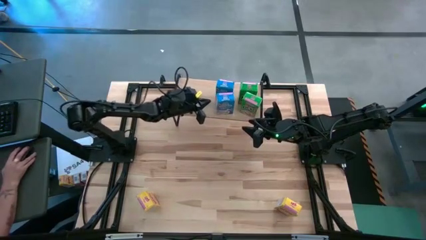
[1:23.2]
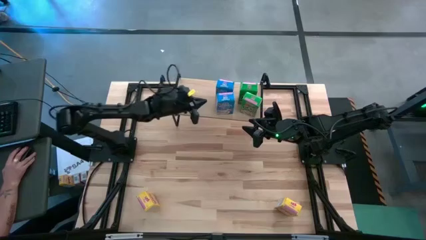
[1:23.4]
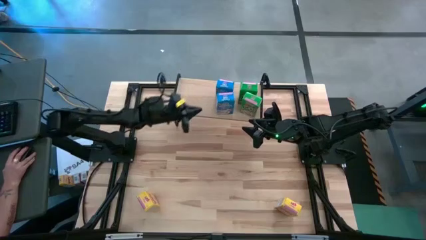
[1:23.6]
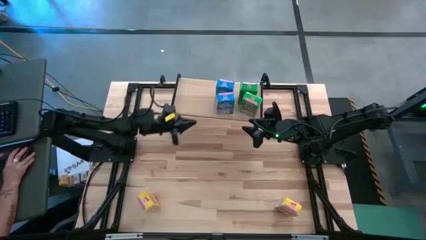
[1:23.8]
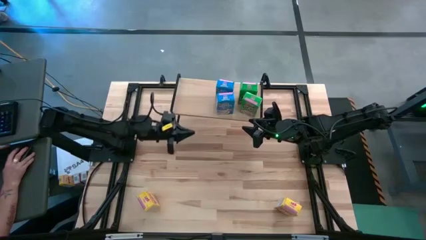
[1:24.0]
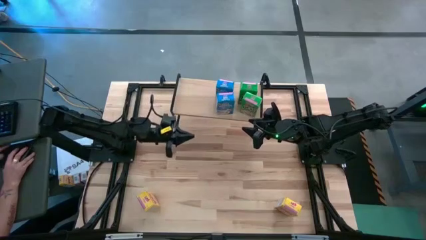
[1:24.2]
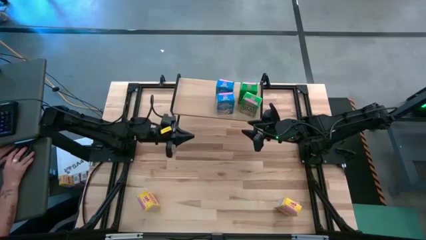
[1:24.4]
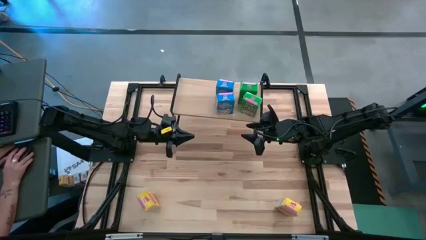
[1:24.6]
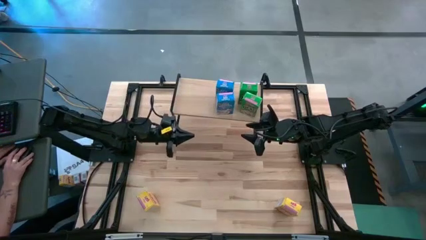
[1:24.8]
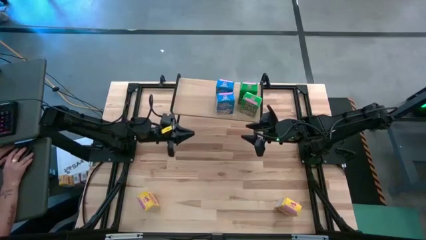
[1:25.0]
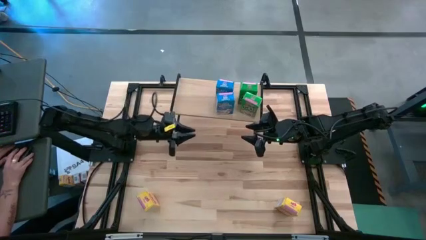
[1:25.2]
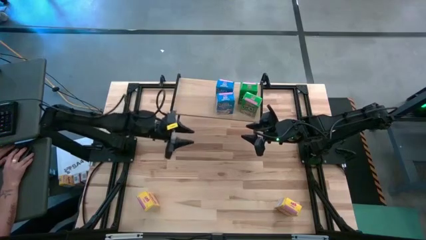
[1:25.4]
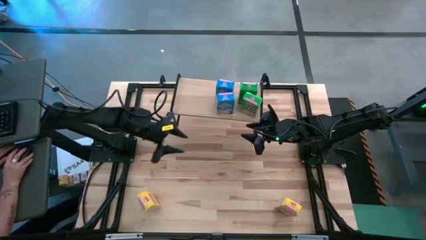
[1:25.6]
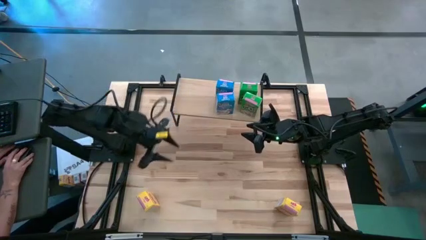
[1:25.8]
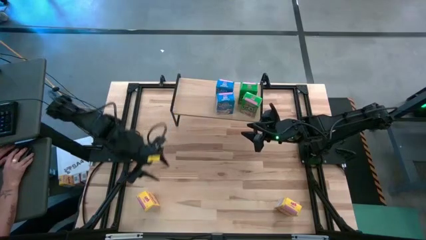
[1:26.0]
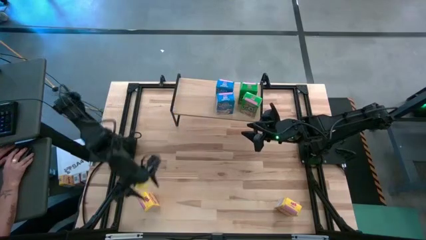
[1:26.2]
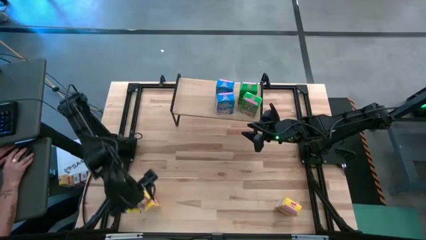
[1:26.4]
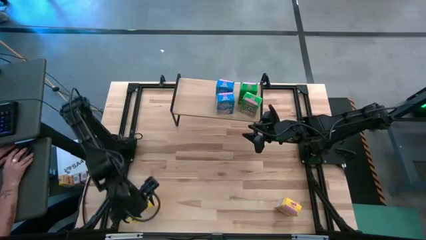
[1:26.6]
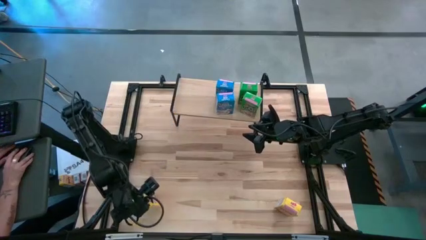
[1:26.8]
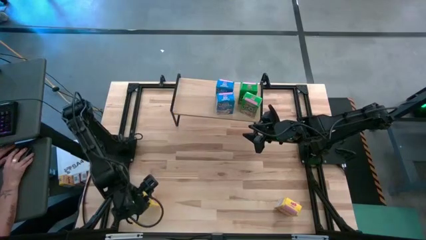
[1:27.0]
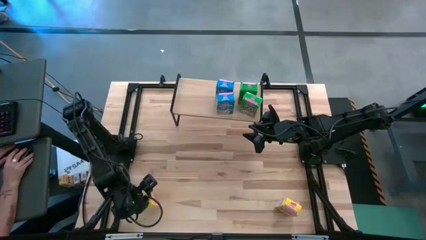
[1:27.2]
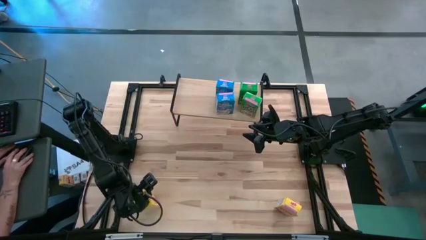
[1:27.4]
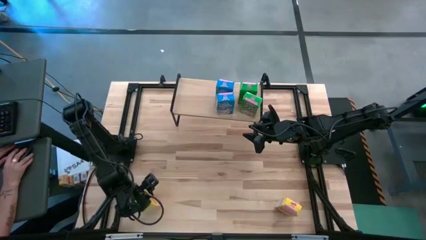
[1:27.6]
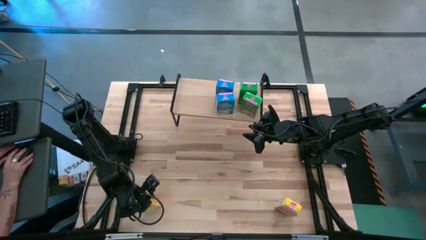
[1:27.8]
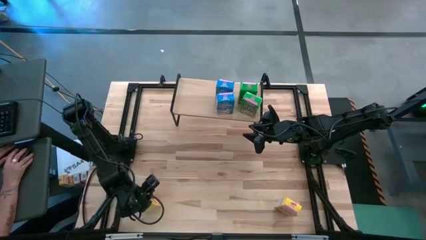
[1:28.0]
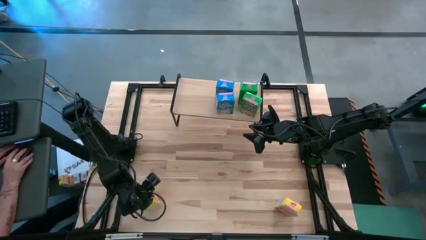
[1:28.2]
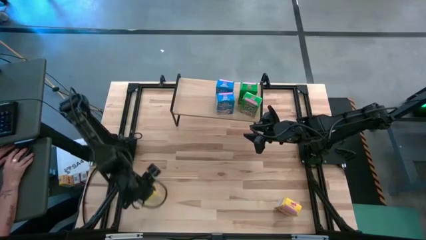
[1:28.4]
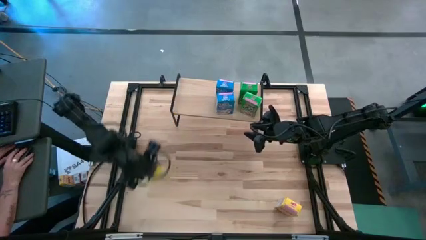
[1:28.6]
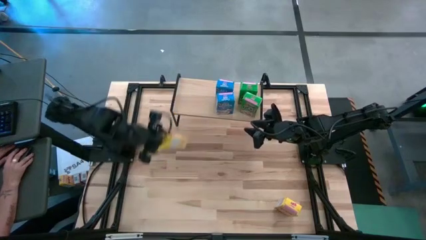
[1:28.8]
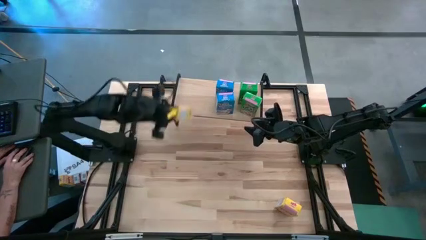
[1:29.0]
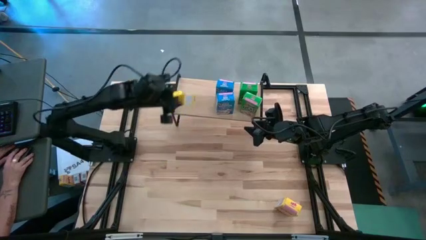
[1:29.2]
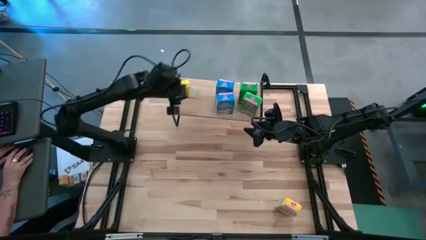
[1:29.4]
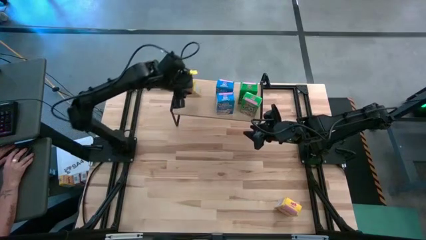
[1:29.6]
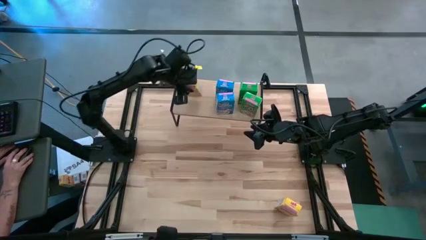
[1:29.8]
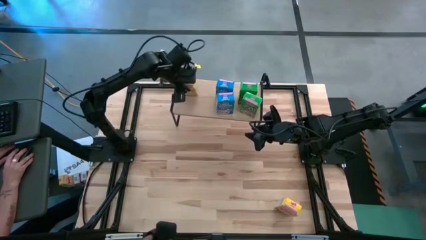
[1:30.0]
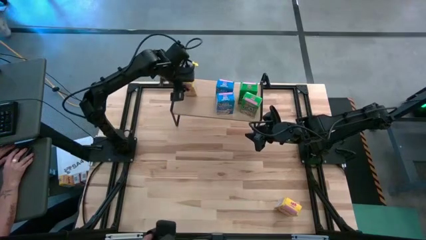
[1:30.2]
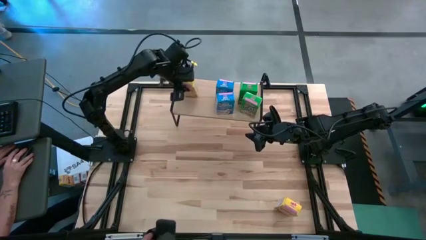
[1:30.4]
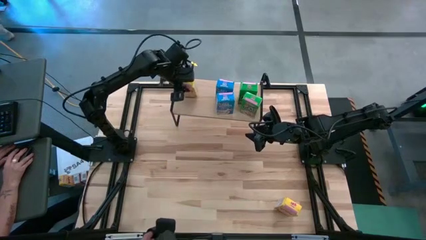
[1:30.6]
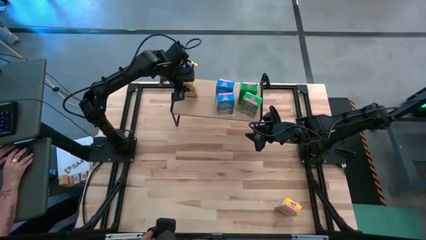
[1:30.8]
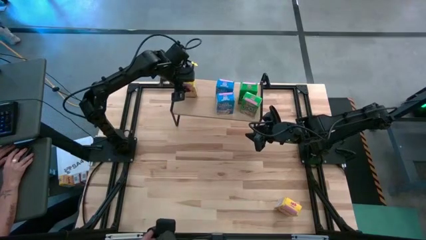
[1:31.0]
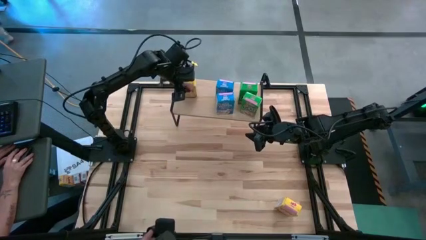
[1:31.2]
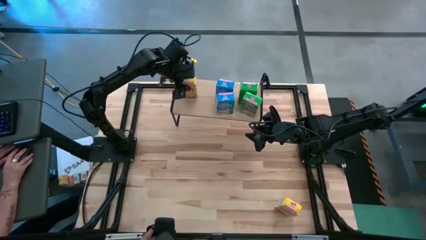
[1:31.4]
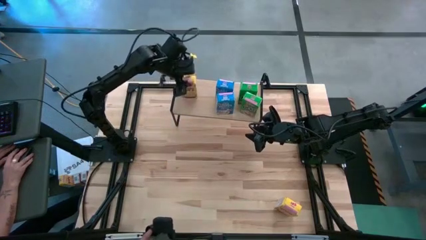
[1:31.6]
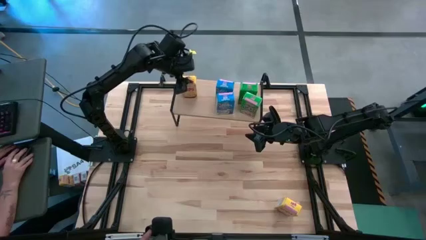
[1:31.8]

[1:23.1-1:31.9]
Task: Stack cereal on shelf
Put the left yellow cereal box on the shelf

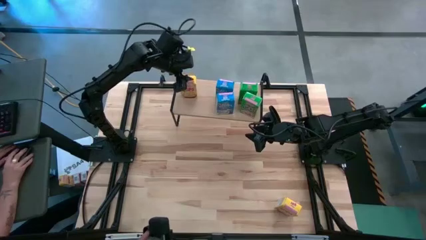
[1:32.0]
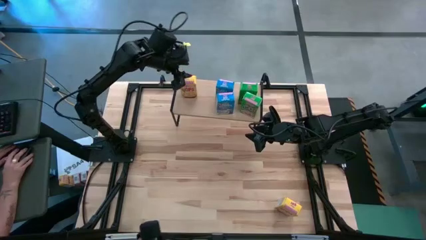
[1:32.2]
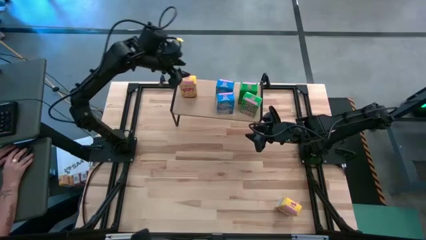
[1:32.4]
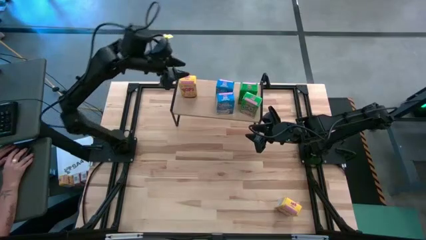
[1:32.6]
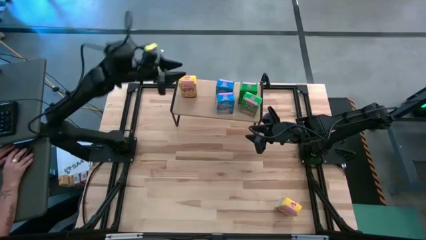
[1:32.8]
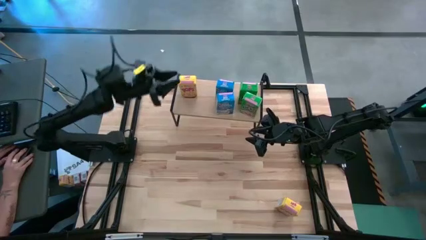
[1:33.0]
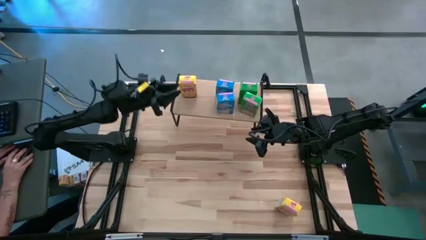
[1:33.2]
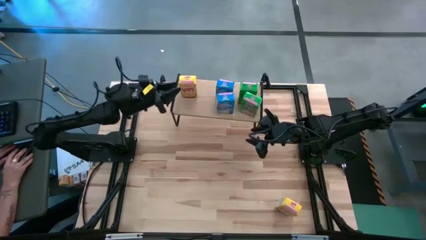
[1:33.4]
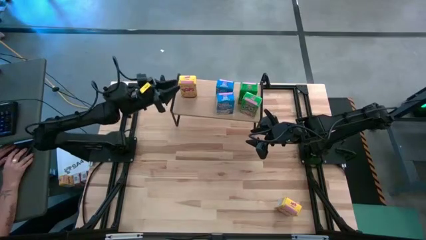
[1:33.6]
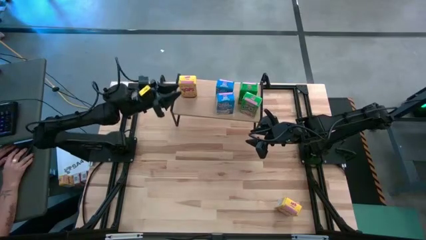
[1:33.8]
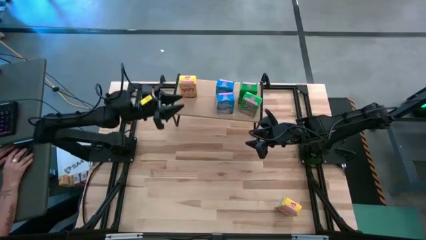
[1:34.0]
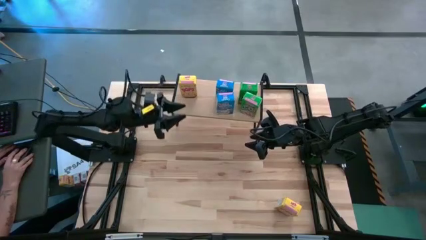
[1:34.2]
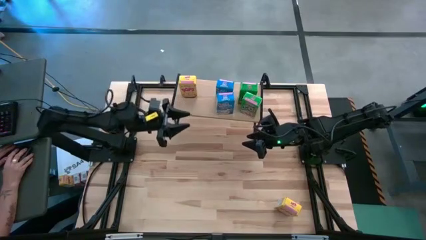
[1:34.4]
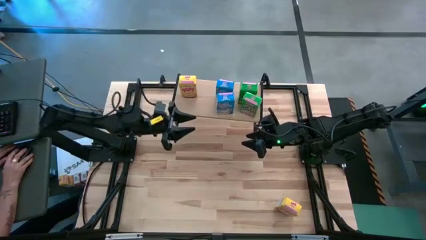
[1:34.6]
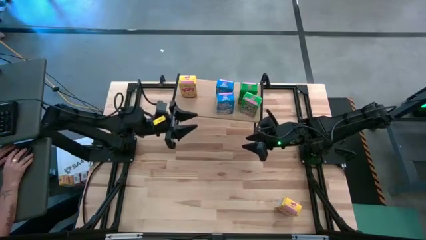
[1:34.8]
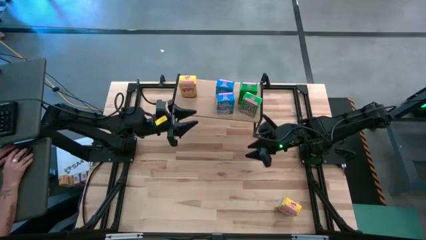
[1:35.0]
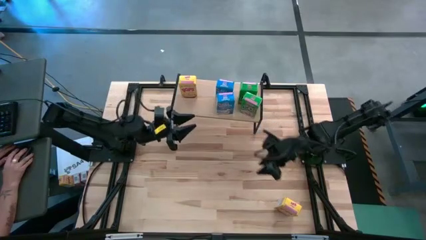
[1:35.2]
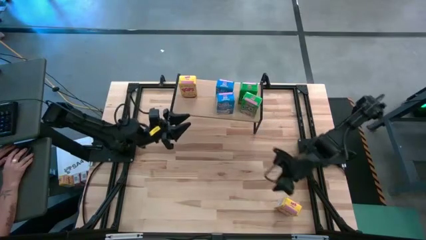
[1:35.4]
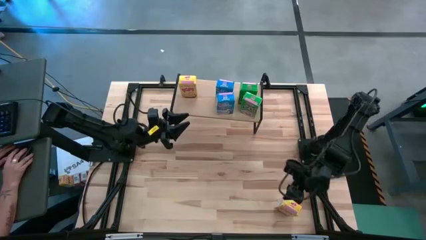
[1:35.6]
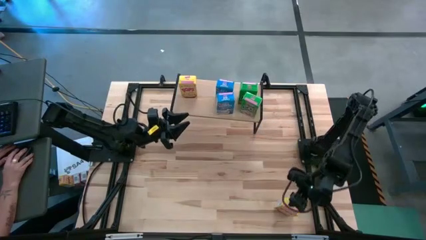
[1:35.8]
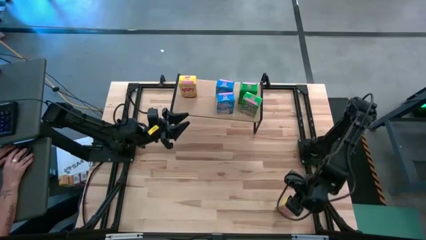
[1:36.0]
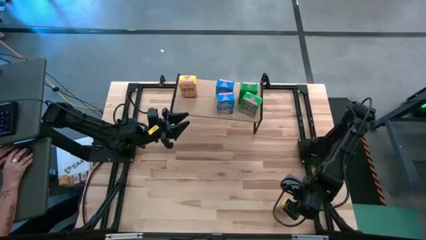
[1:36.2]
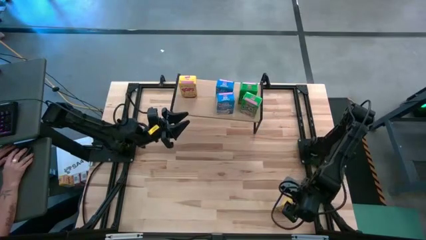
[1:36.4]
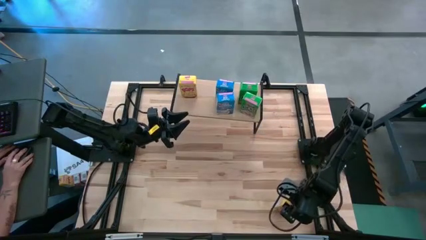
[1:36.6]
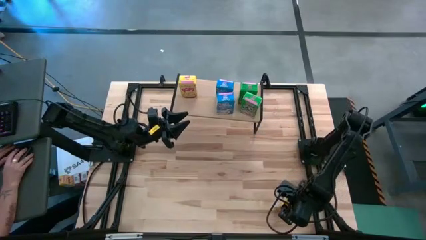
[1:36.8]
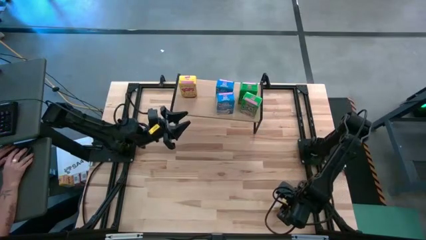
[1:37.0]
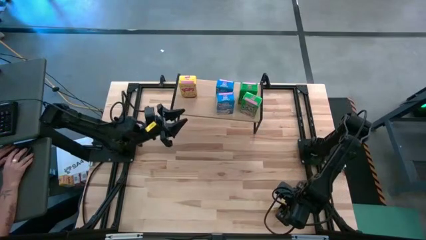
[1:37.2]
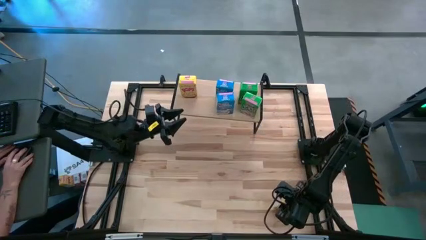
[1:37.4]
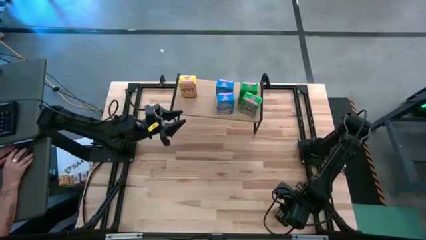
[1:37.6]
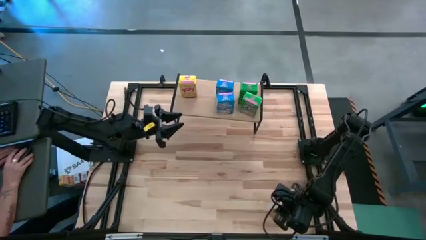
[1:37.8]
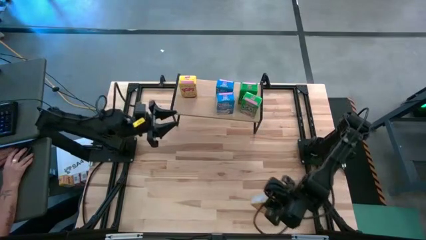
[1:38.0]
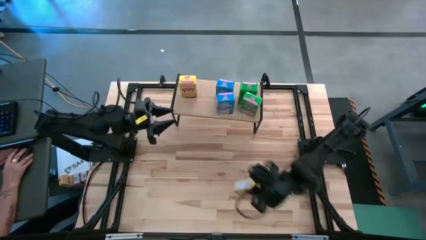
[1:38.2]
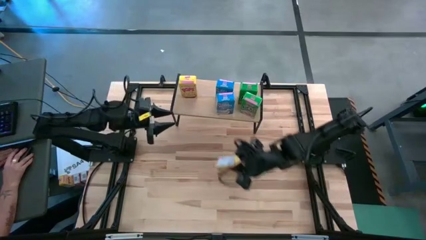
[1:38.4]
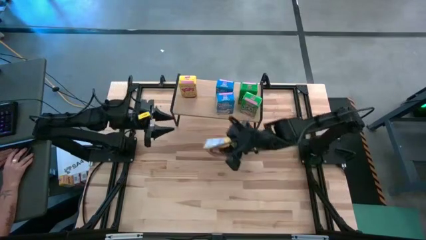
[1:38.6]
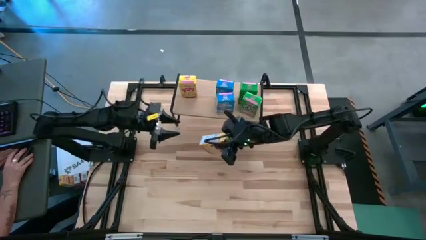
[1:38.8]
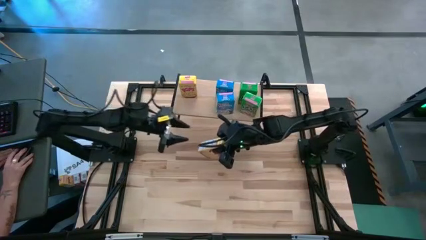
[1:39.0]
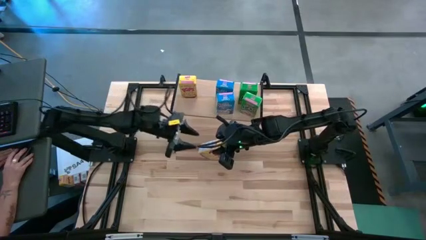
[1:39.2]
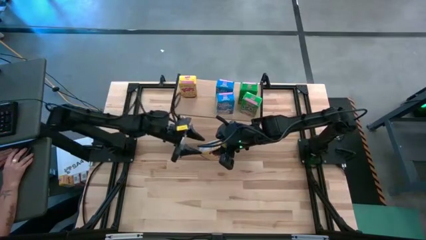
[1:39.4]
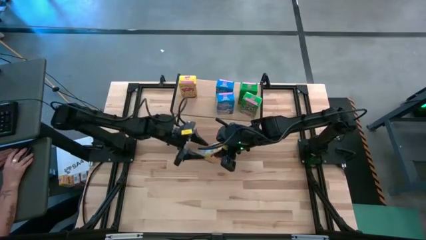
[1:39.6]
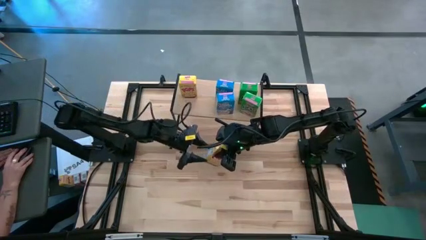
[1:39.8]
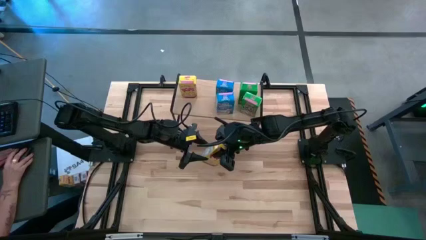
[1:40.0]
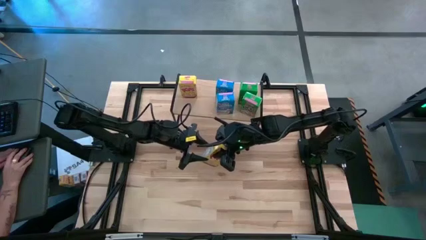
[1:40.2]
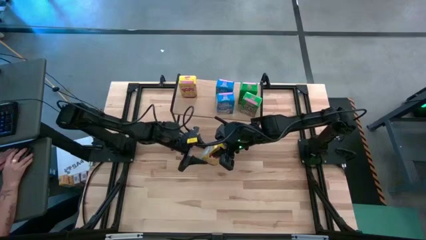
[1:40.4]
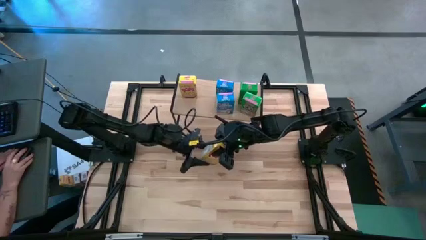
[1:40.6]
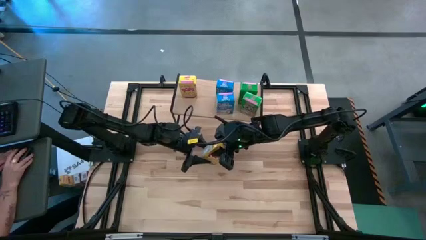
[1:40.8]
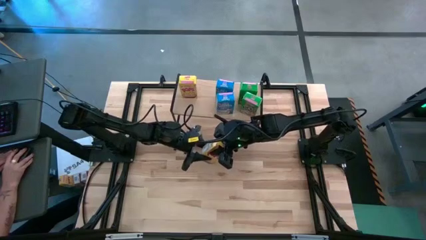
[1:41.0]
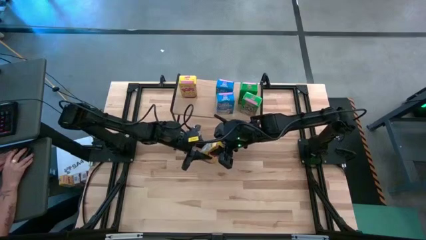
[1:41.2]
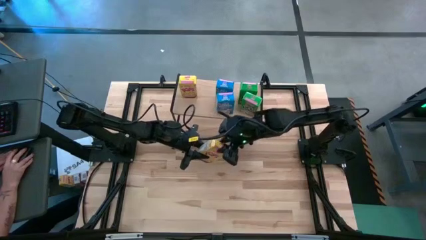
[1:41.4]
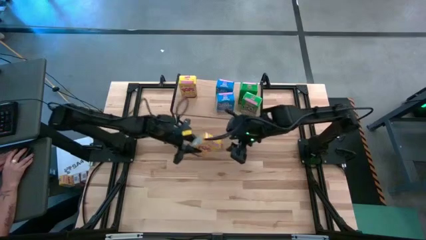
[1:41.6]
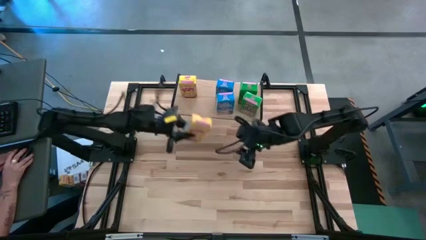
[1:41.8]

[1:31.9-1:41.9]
Put the yellow cereal box on the shelf aligned with the other yellow cereal box
